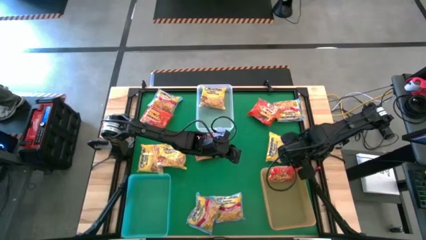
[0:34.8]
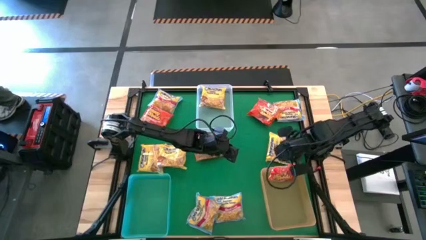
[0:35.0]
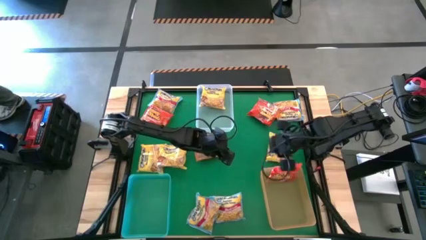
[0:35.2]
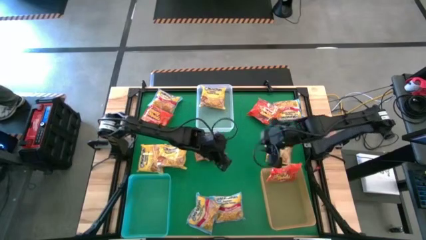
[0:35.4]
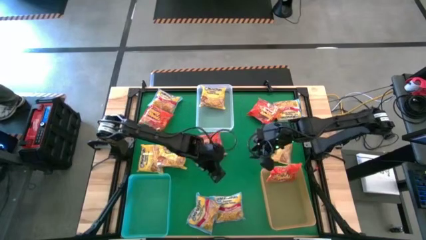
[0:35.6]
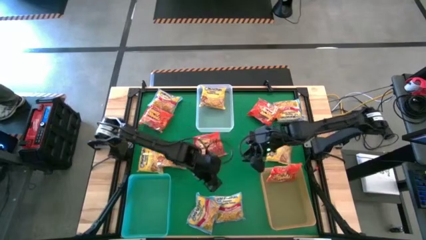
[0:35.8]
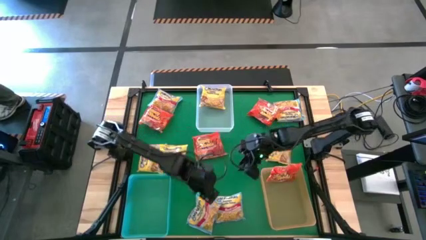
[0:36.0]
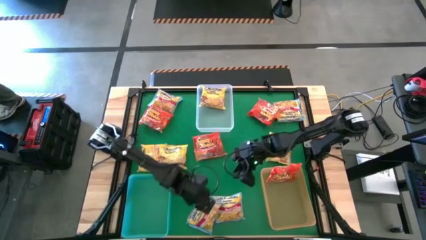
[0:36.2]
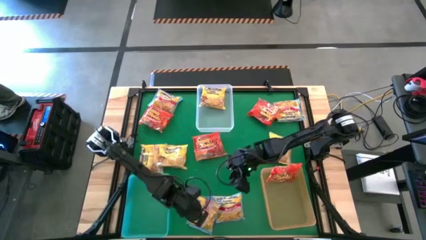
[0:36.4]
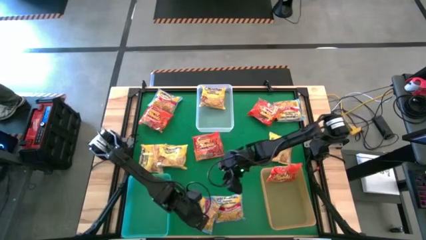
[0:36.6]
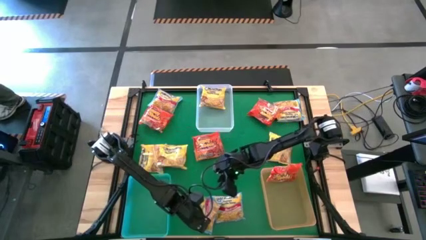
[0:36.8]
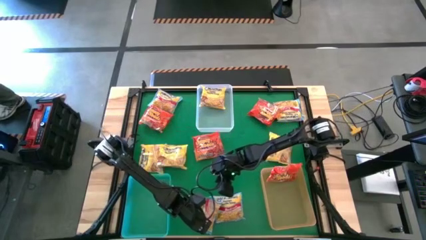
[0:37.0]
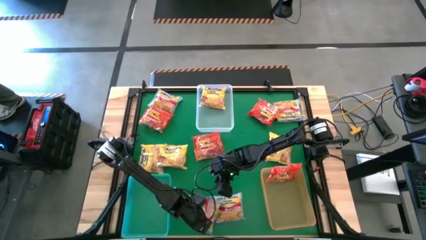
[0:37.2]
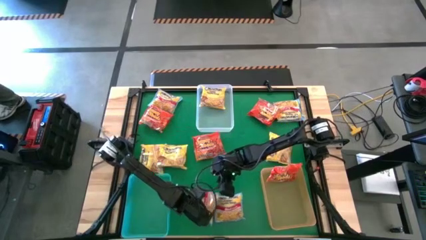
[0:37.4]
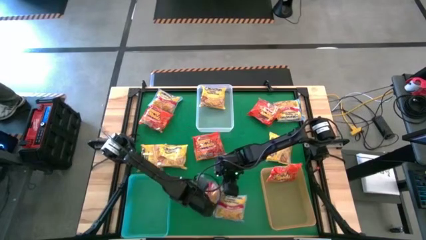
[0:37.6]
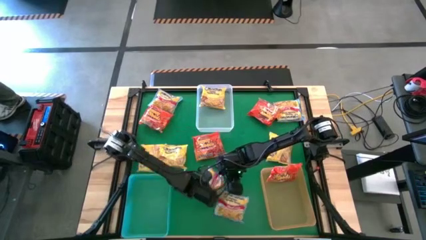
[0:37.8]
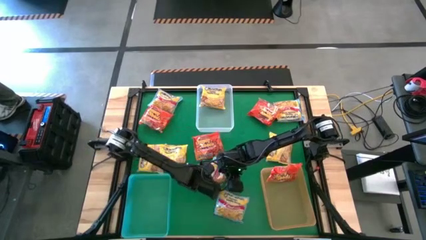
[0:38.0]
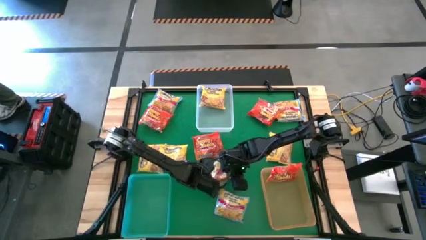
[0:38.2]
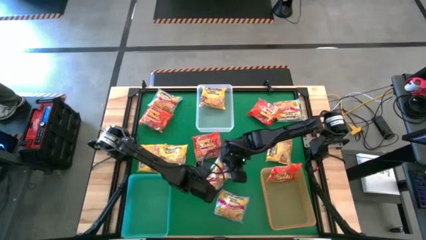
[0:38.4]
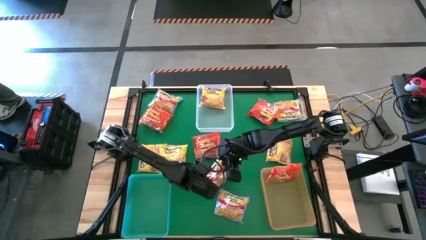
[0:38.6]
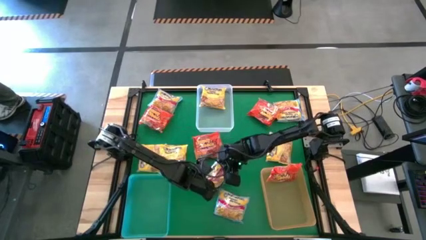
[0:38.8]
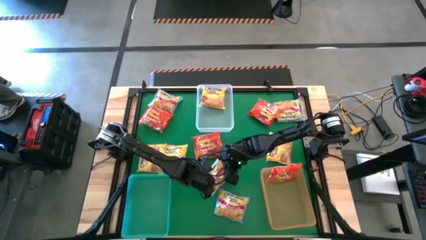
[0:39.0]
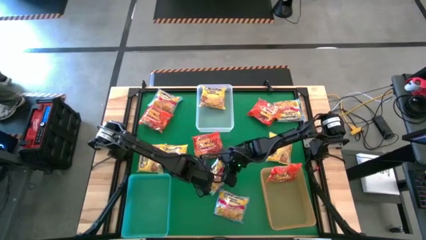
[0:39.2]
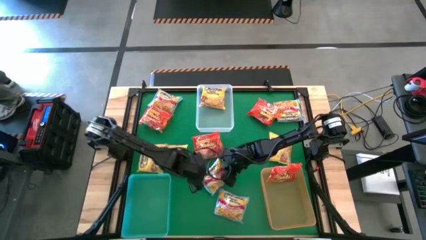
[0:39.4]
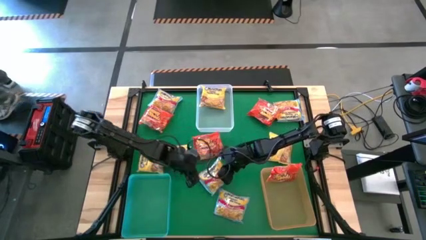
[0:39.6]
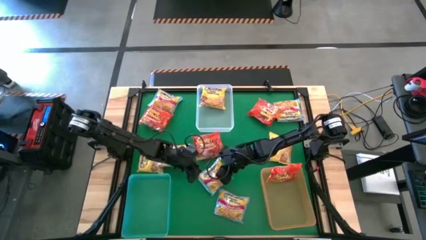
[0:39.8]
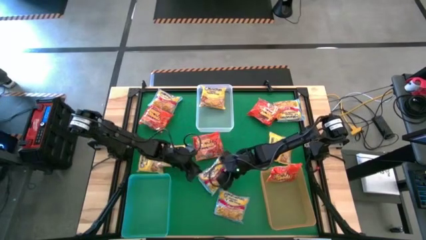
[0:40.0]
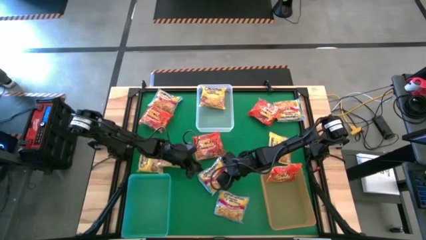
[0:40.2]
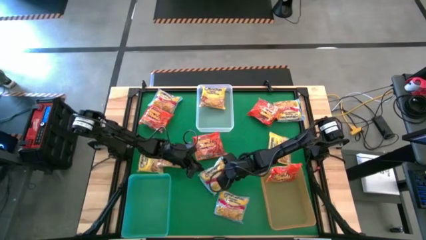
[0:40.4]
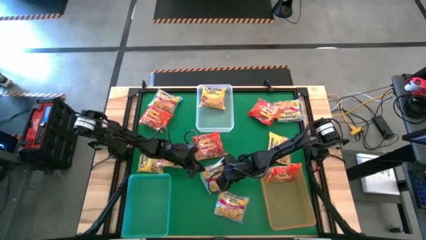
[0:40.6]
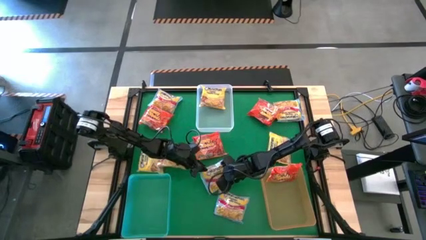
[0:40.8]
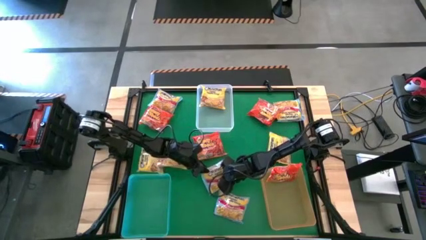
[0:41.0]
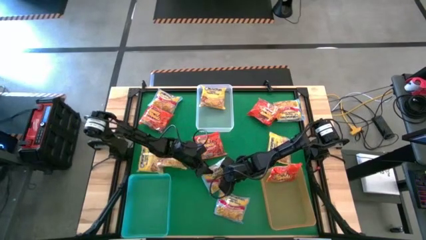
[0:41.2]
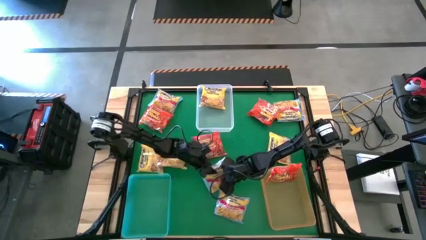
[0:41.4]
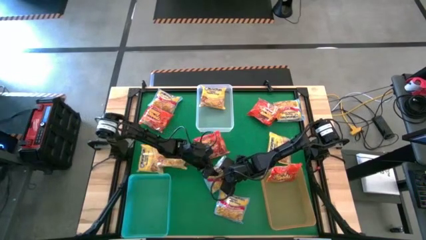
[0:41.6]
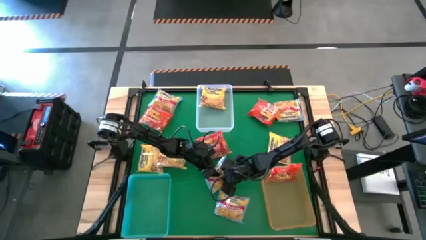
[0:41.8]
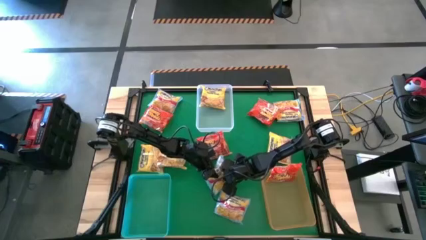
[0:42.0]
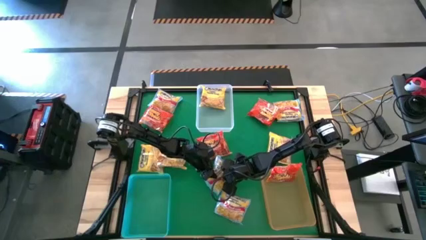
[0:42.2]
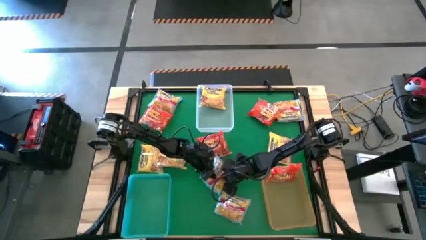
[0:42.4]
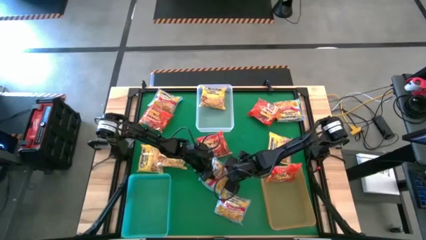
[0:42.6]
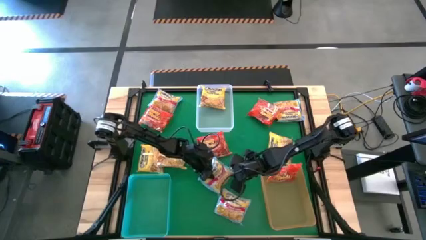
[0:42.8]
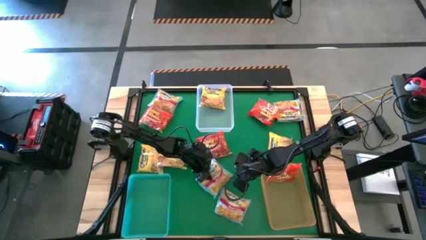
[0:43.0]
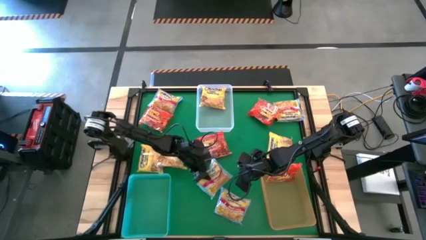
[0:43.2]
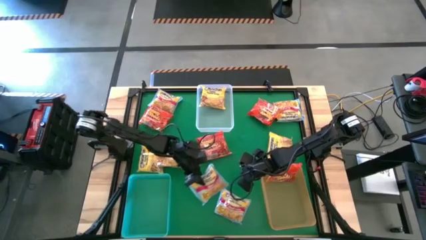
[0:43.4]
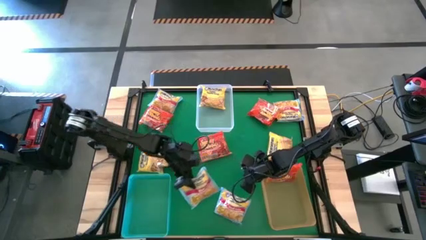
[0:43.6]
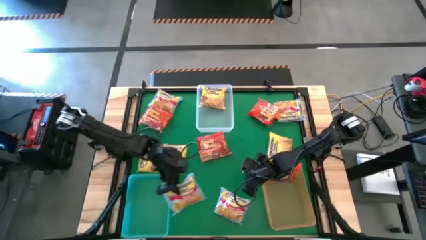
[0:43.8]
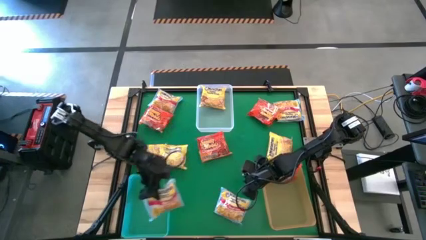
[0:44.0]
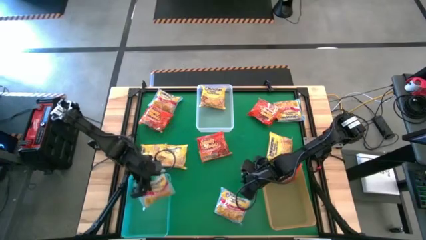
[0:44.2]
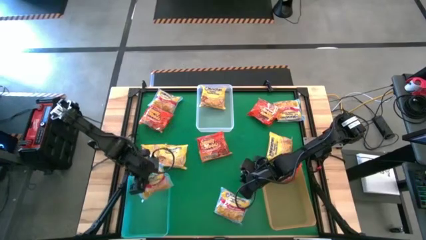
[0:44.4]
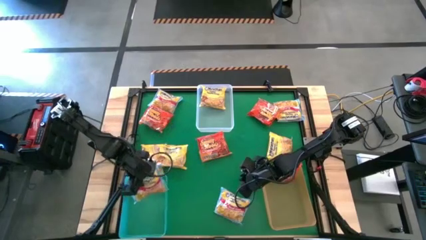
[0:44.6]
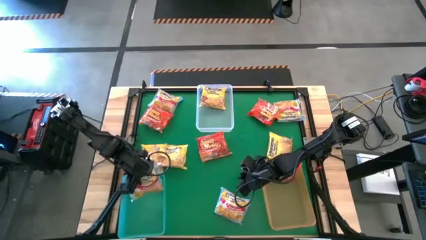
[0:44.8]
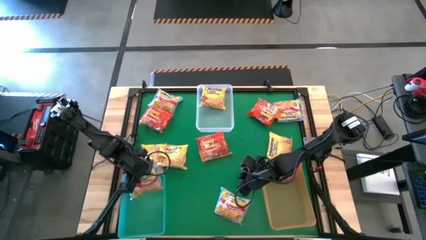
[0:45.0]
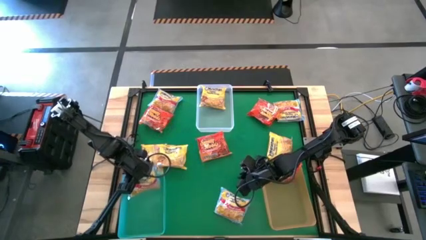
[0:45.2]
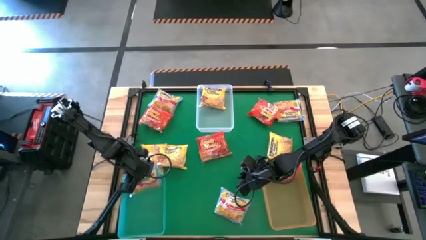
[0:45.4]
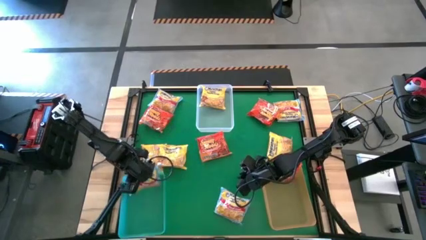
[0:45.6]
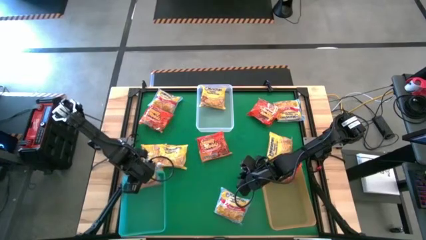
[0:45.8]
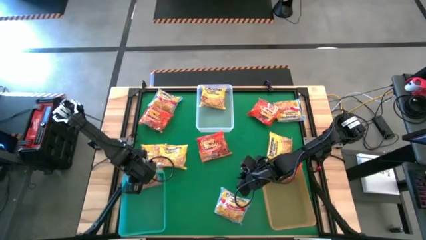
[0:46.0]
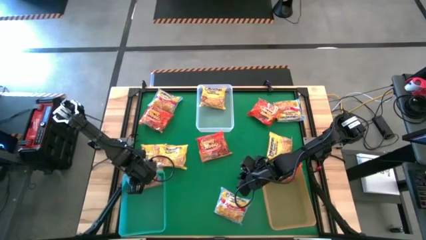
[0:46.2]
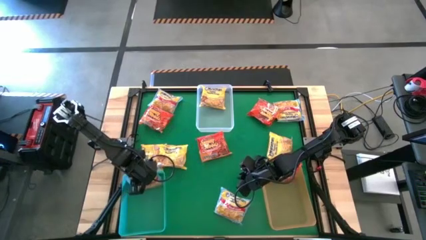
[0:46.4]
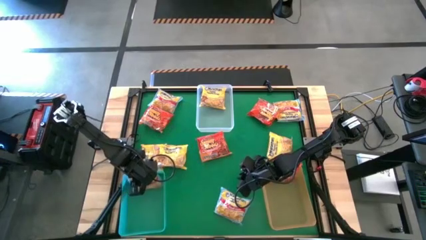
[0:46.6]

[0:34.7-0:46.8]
Task: Sort Maruchan noodles
Put the blue noodle pack into the blue bin
